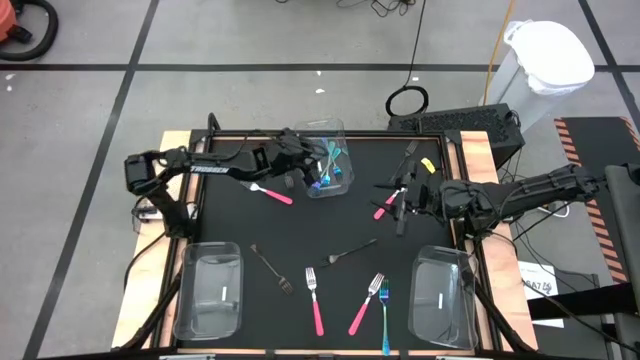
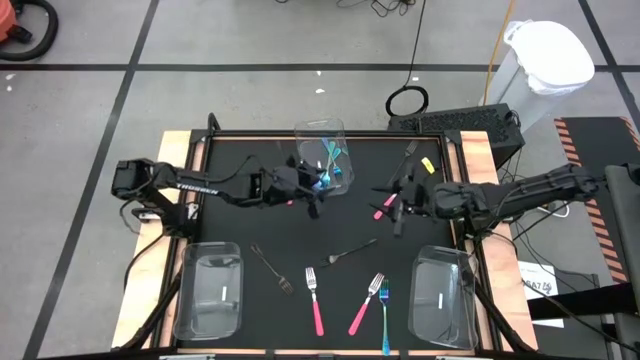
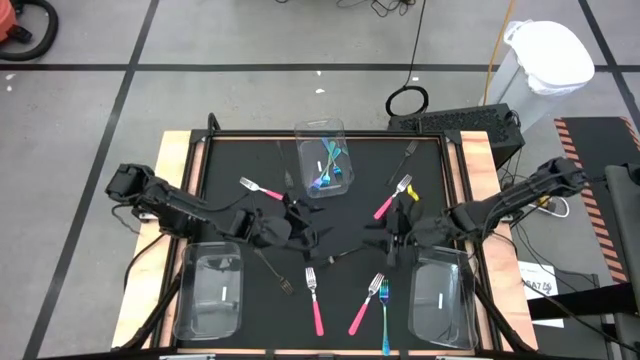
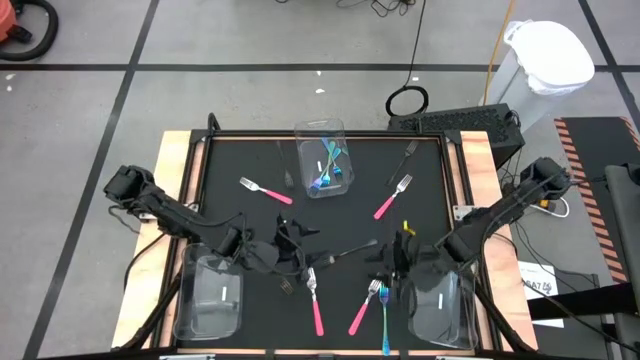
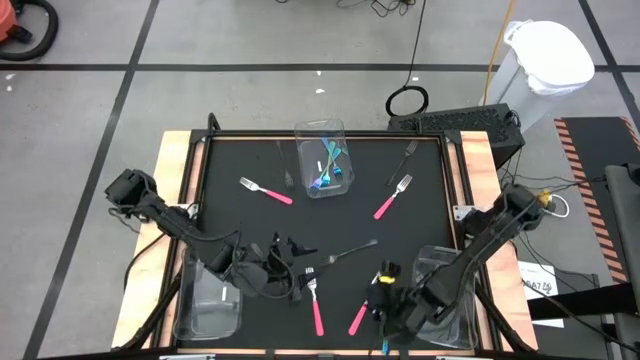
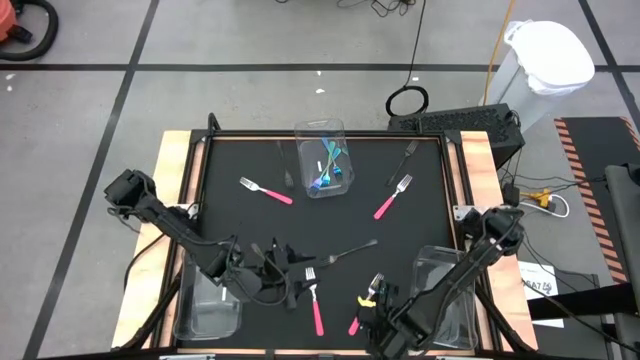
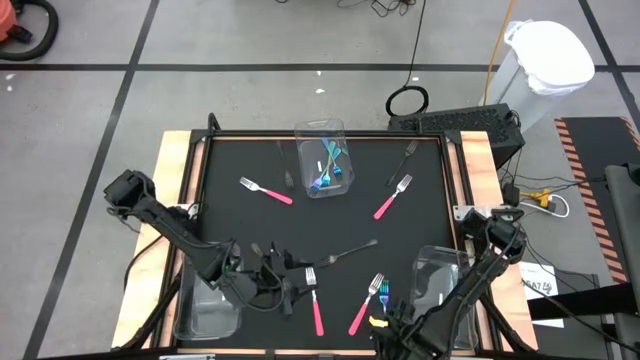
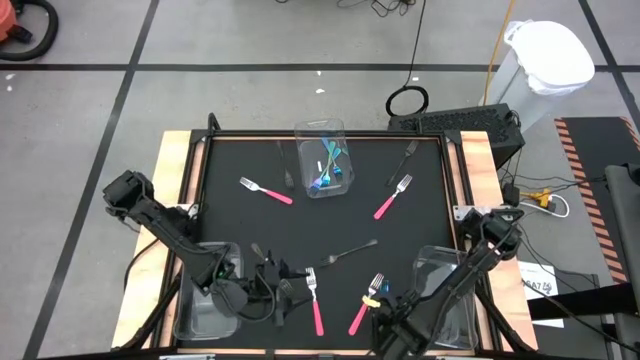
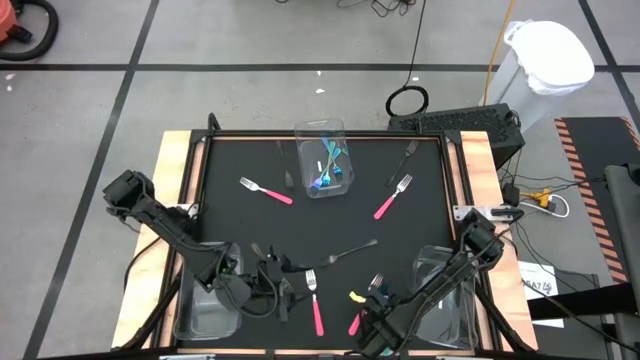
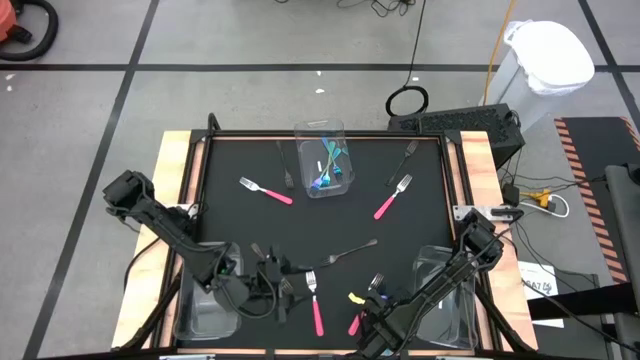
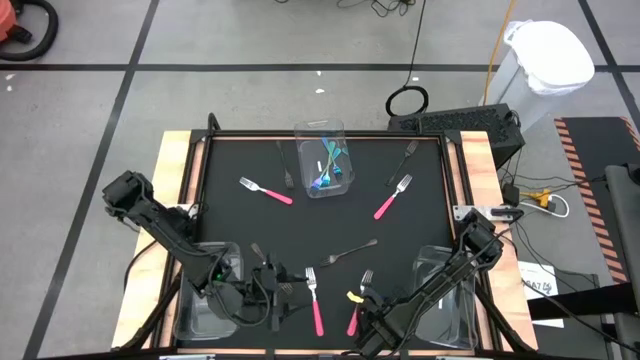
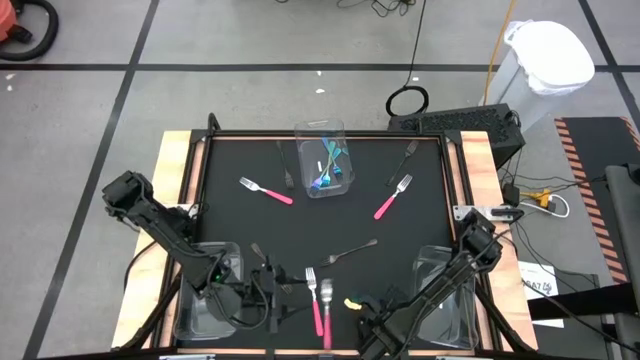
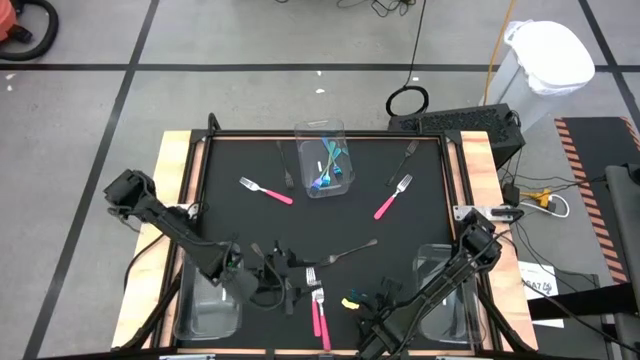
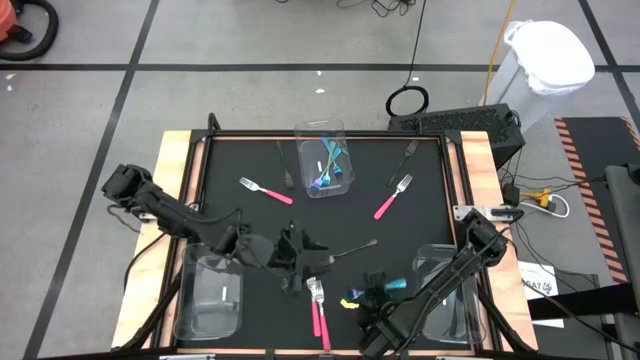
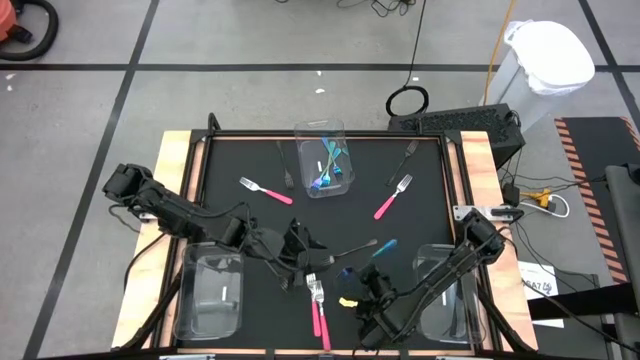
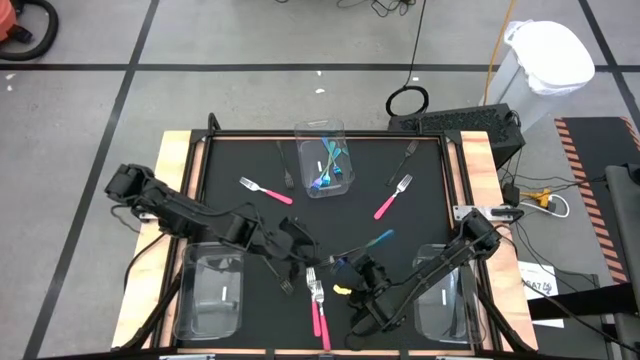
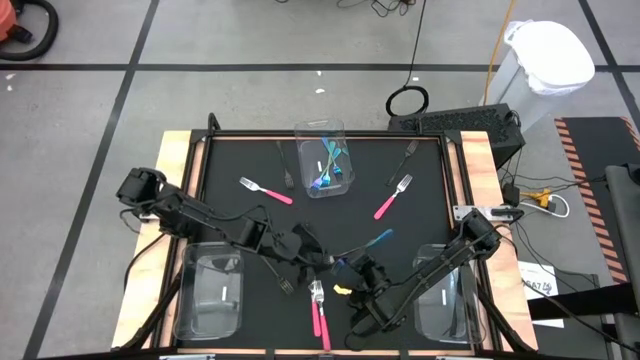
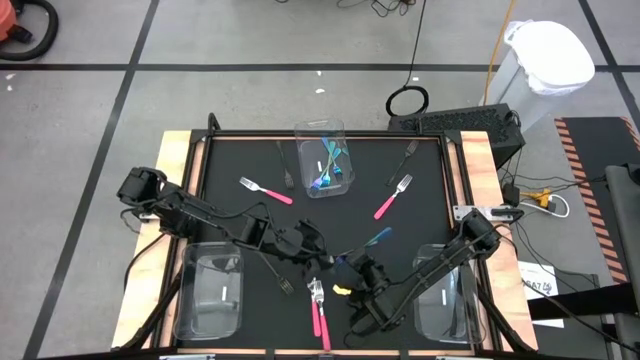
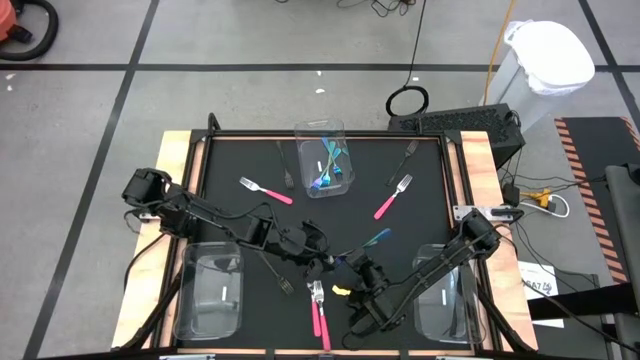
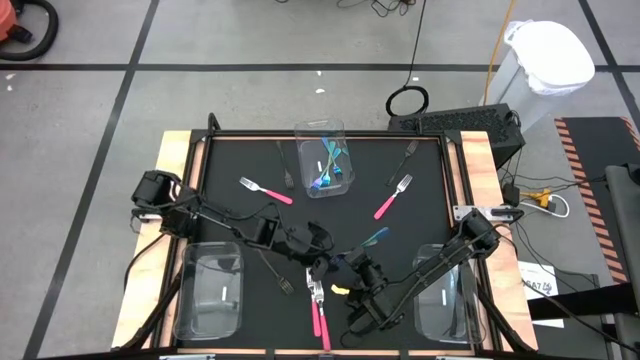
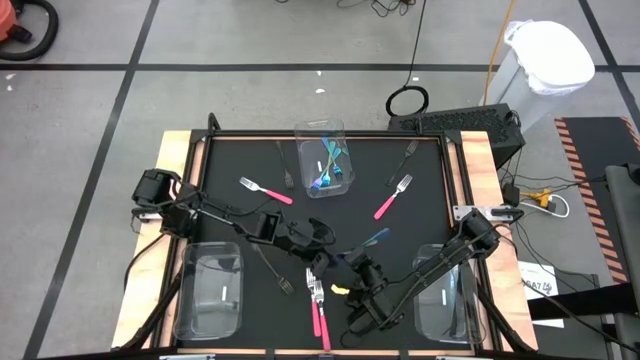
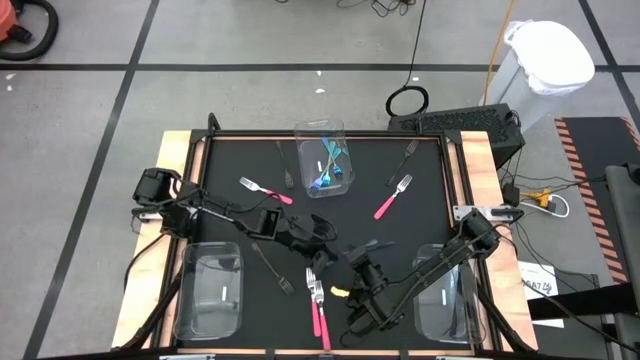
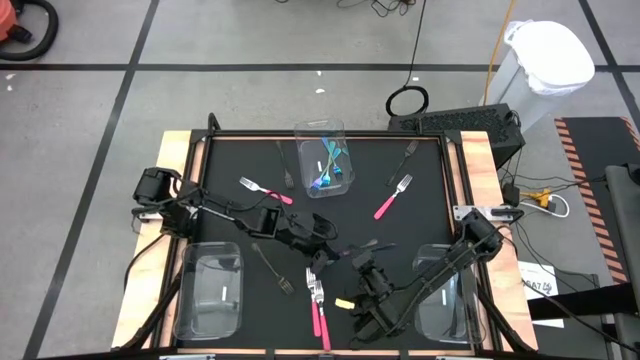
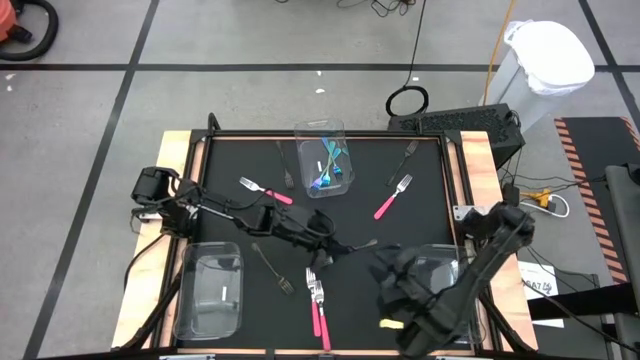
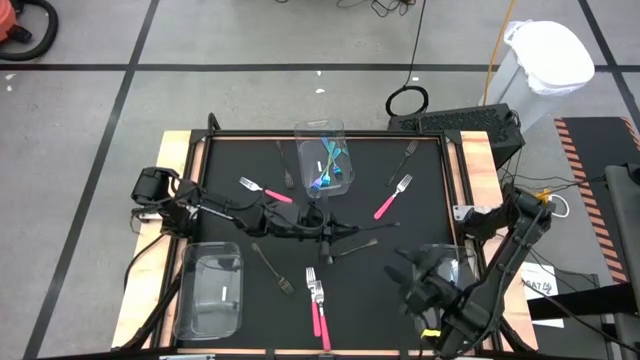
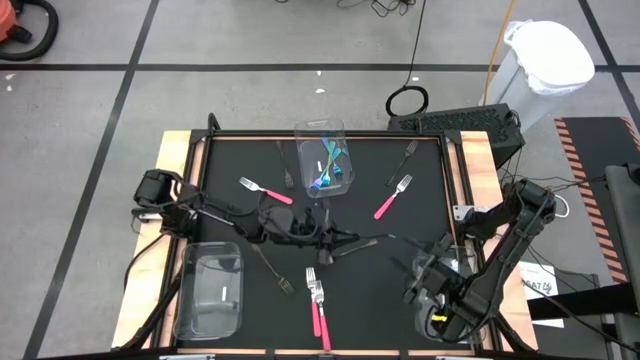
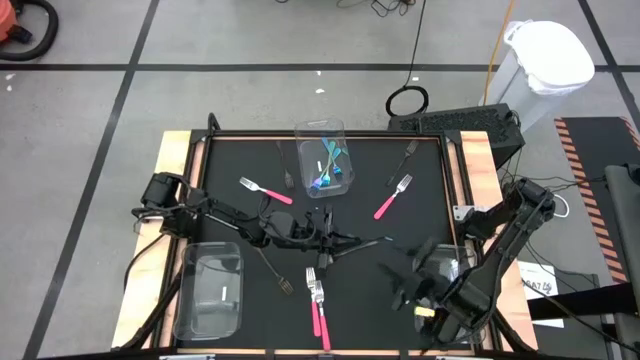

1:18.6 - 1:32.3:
Task: Sort silverware by color (type)
Put the blue fork into the top transparent bin

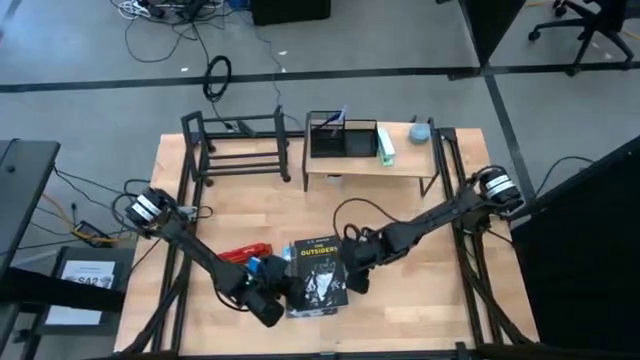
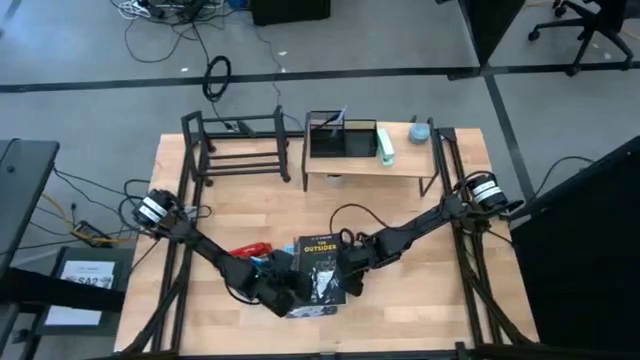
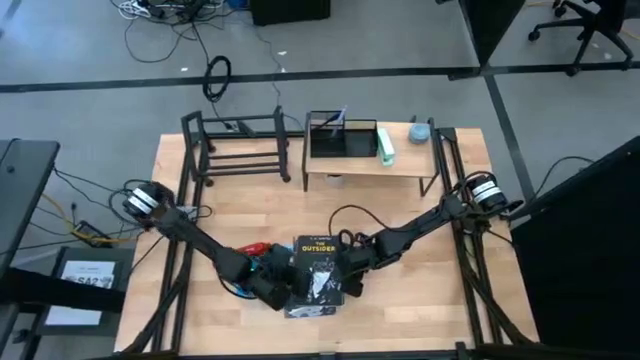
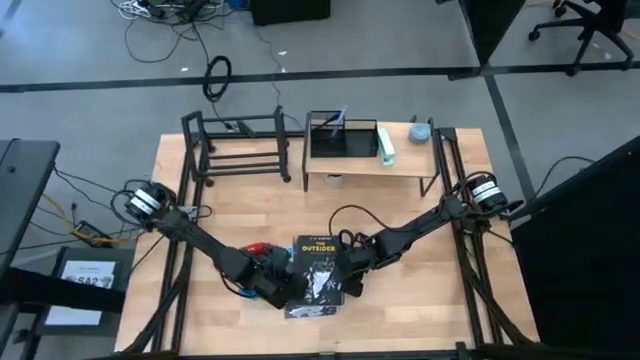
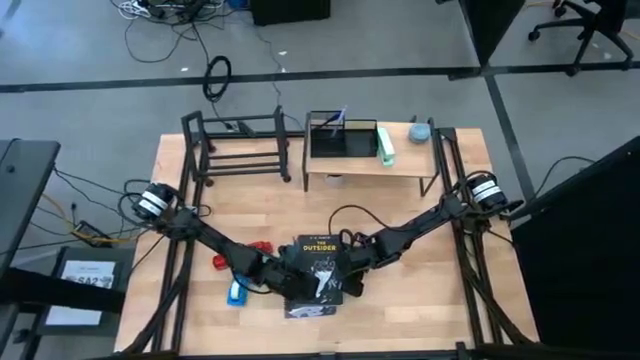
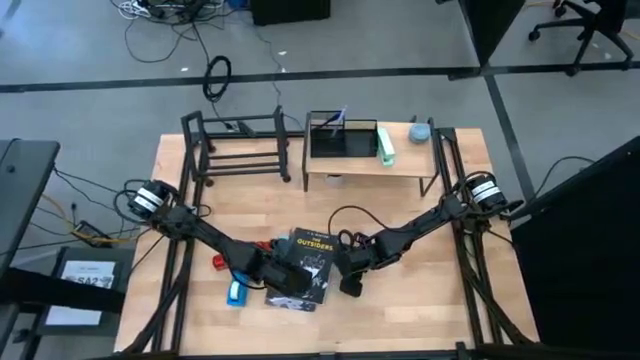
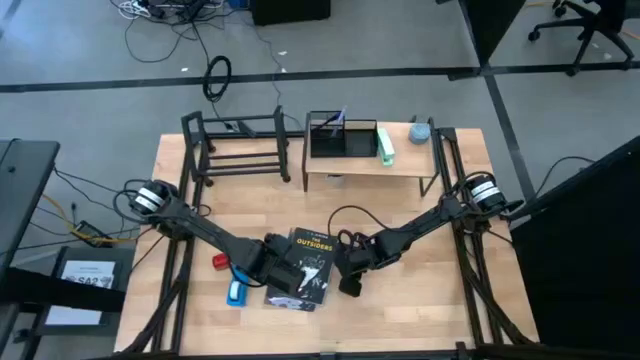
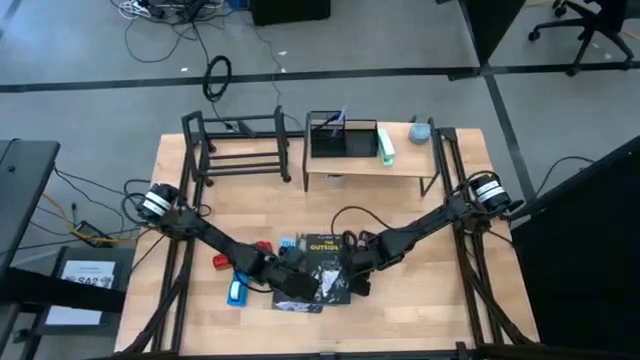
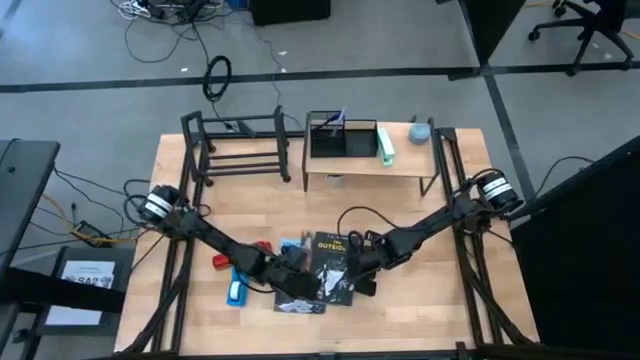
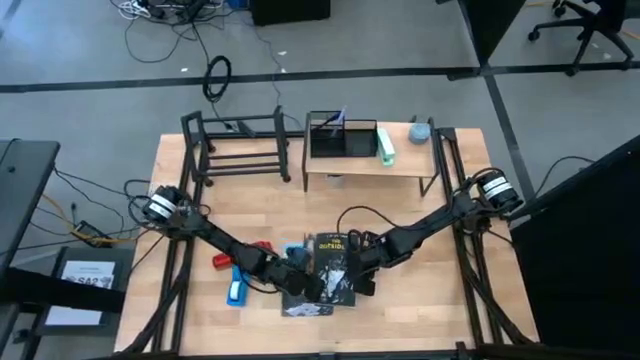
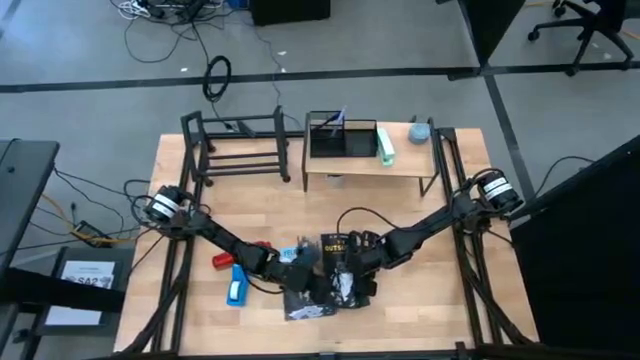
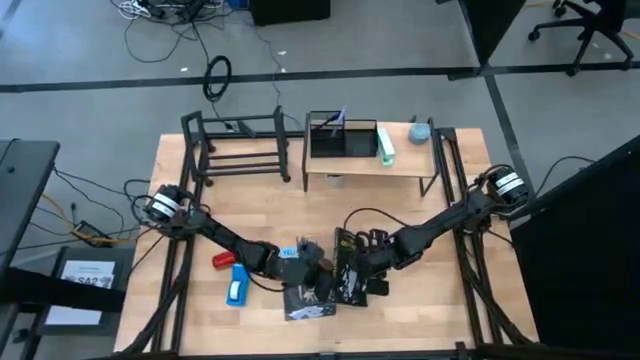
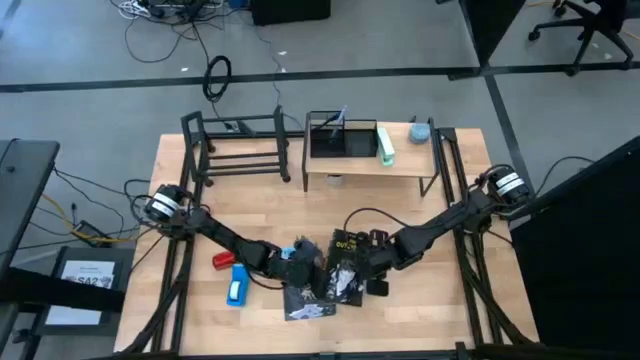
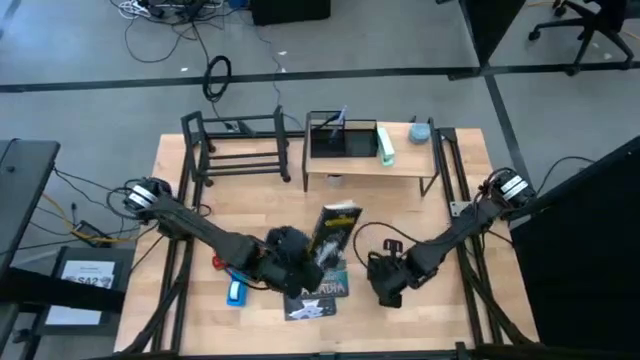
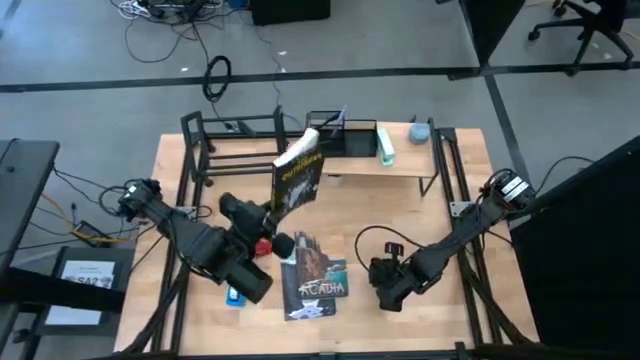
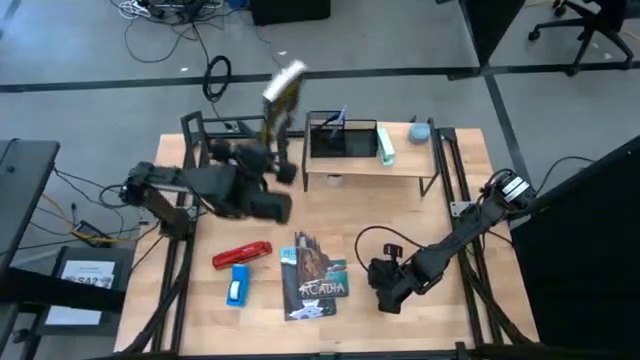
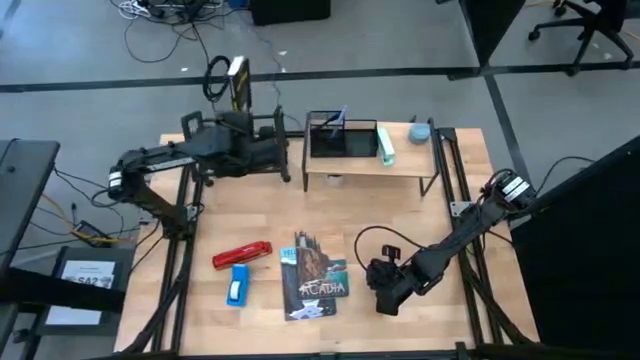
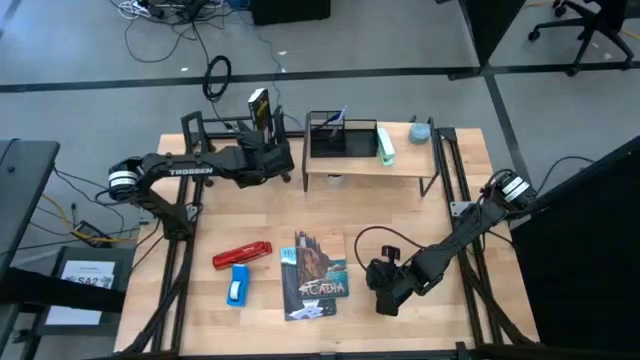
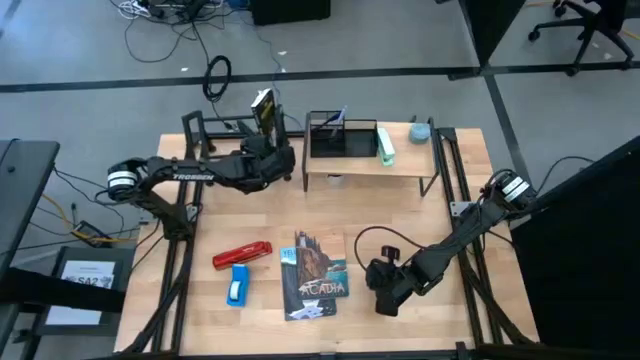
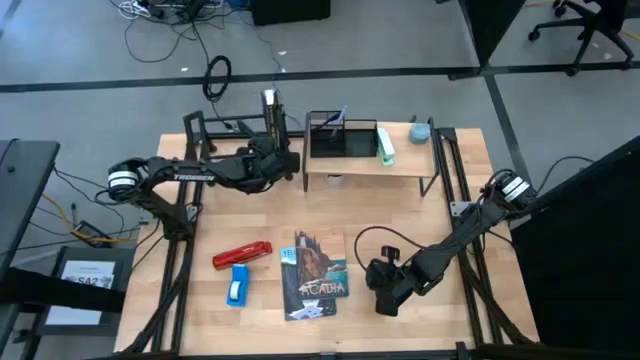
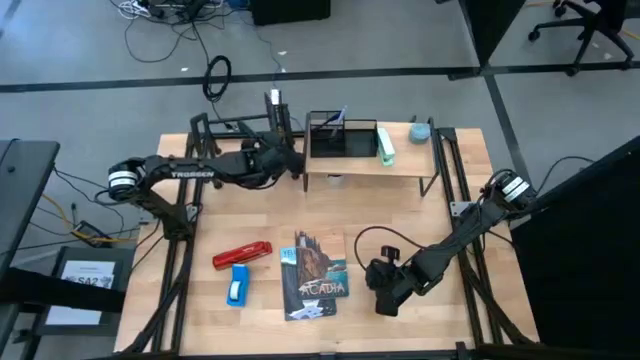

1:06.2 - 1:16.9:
Task: Stock shelves
Put the black book on the black bookshelf
